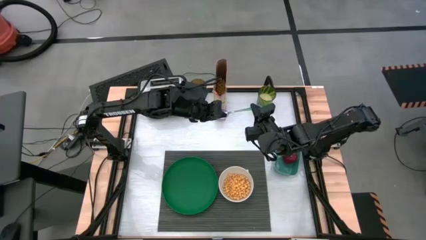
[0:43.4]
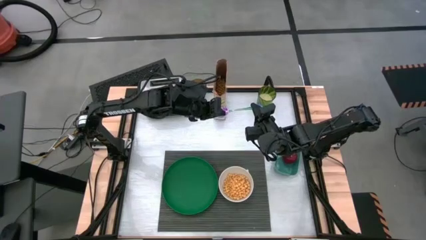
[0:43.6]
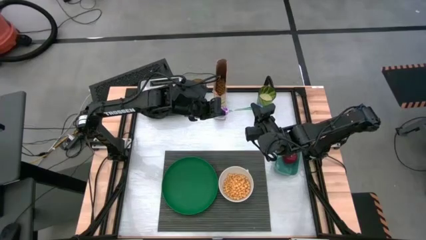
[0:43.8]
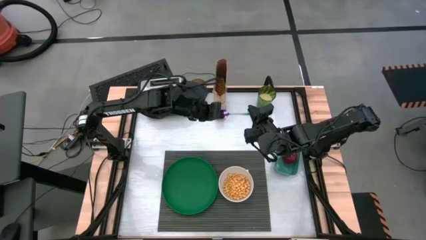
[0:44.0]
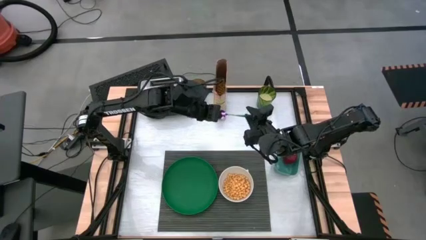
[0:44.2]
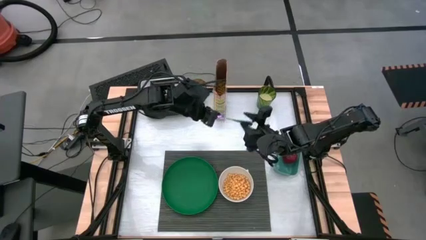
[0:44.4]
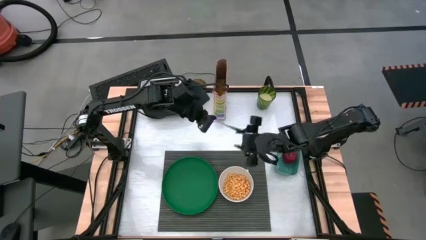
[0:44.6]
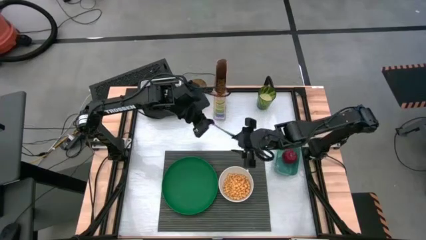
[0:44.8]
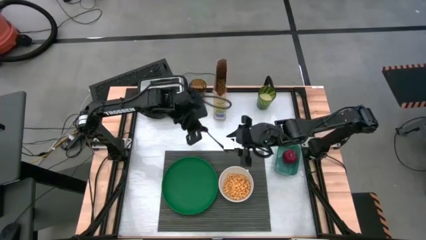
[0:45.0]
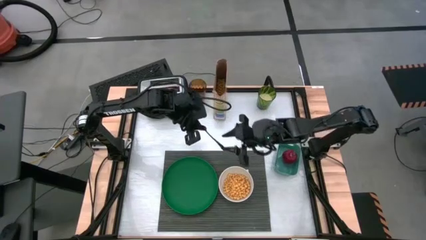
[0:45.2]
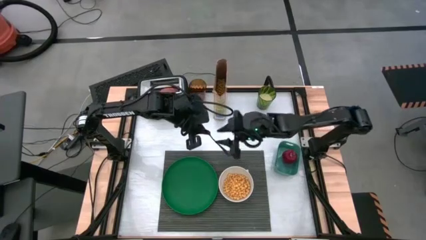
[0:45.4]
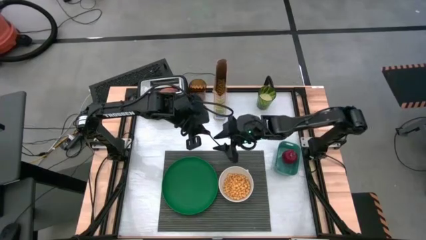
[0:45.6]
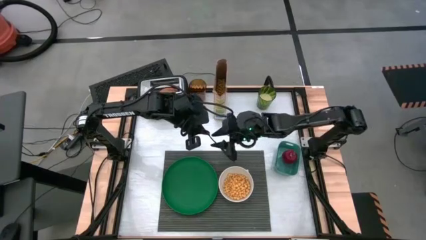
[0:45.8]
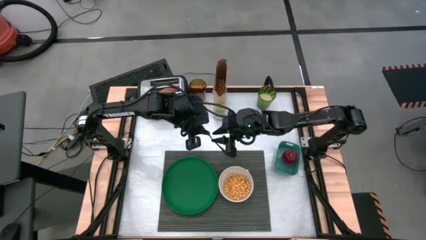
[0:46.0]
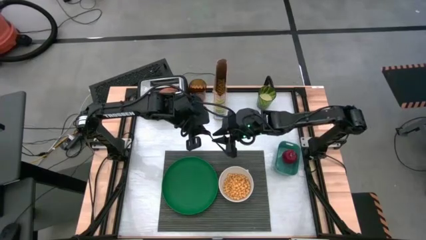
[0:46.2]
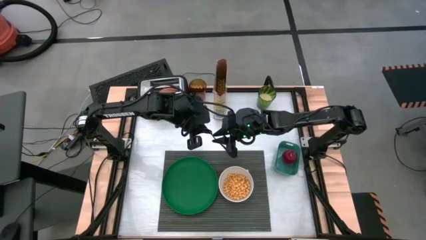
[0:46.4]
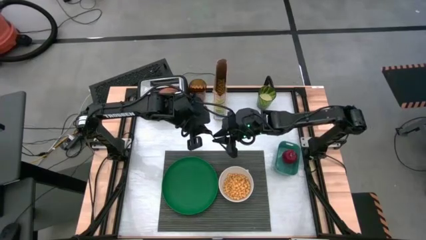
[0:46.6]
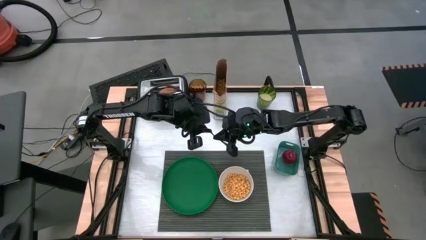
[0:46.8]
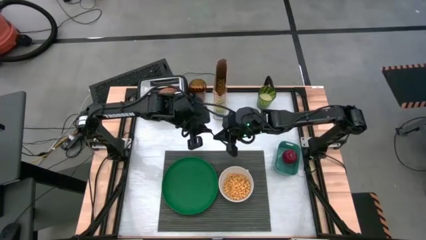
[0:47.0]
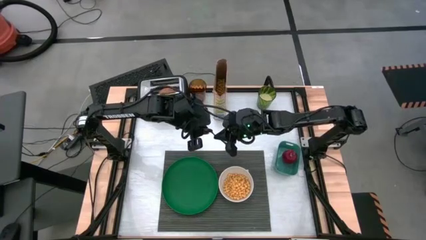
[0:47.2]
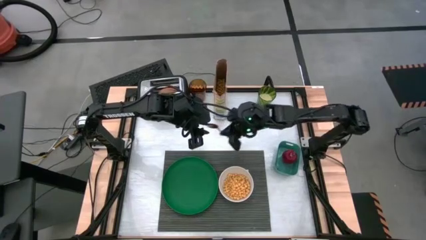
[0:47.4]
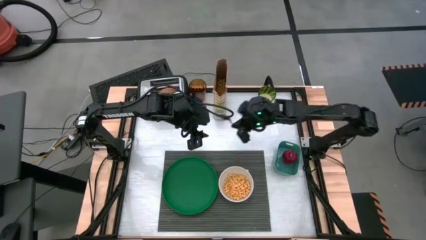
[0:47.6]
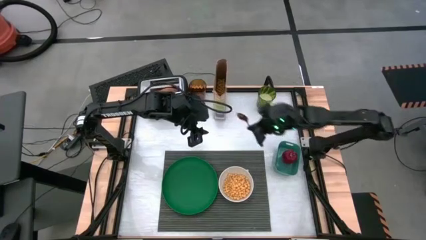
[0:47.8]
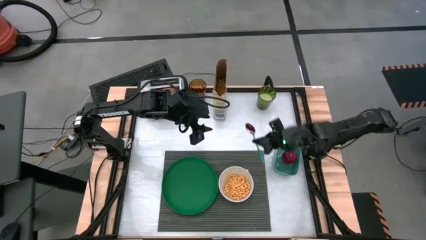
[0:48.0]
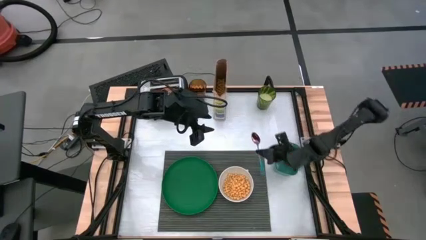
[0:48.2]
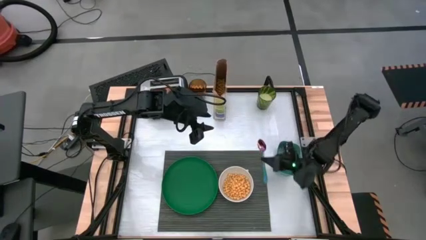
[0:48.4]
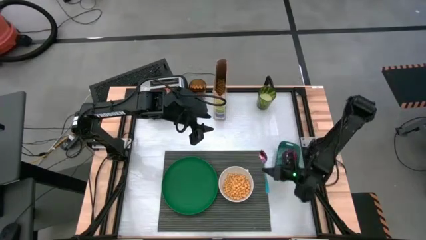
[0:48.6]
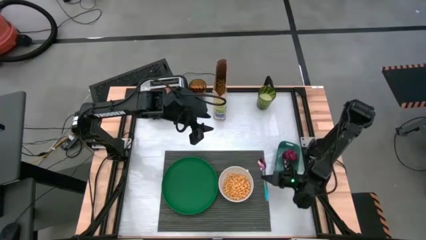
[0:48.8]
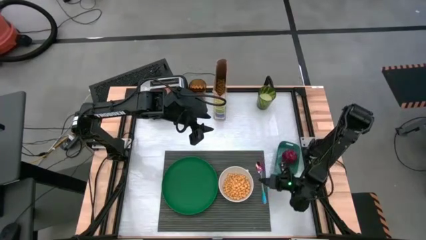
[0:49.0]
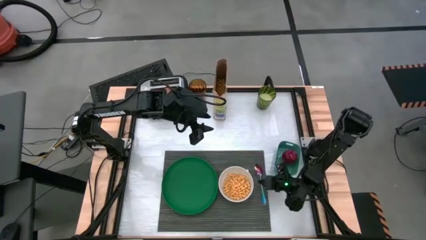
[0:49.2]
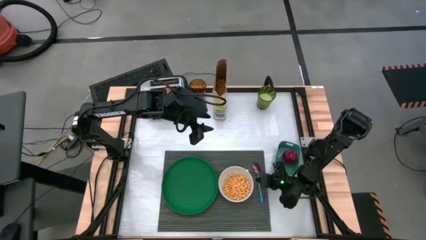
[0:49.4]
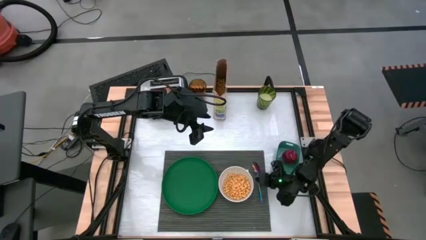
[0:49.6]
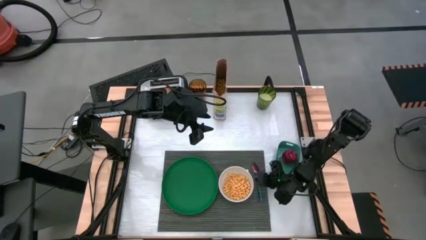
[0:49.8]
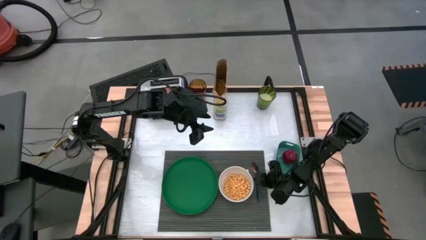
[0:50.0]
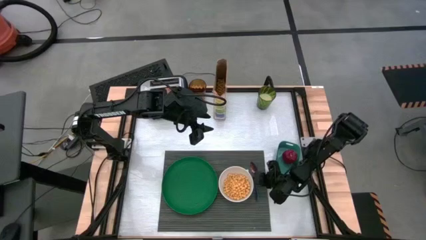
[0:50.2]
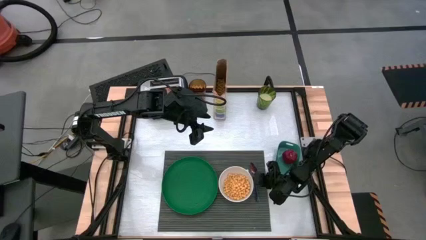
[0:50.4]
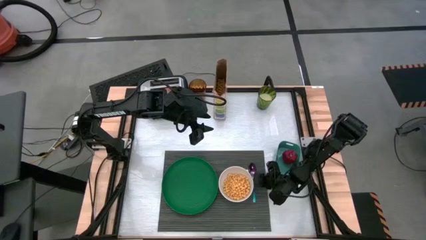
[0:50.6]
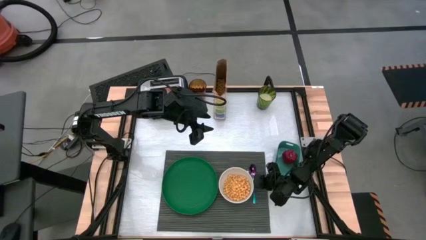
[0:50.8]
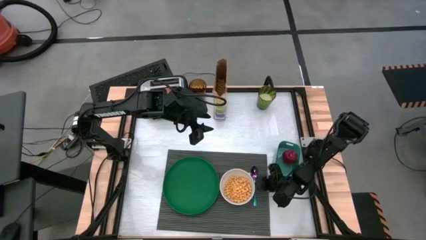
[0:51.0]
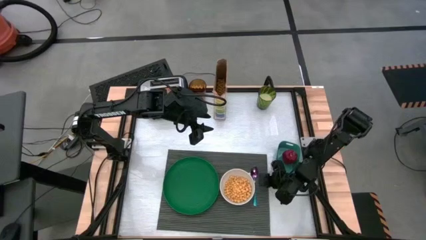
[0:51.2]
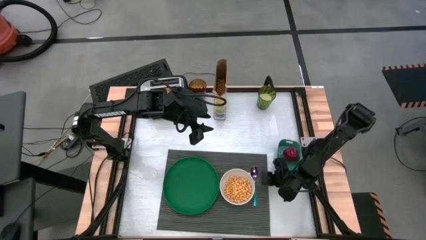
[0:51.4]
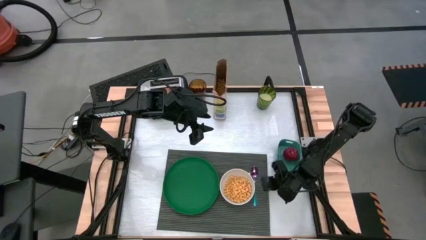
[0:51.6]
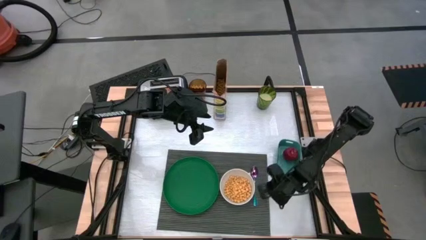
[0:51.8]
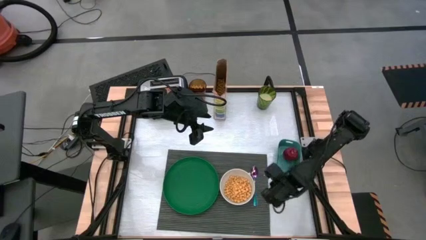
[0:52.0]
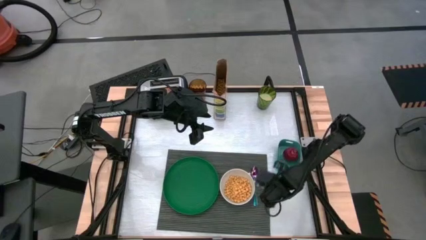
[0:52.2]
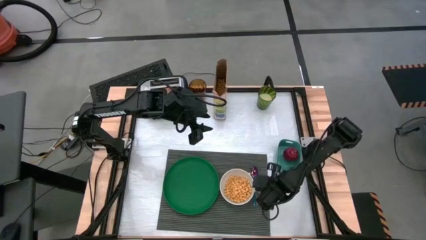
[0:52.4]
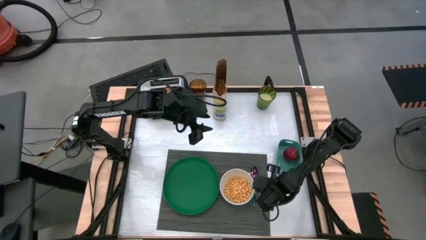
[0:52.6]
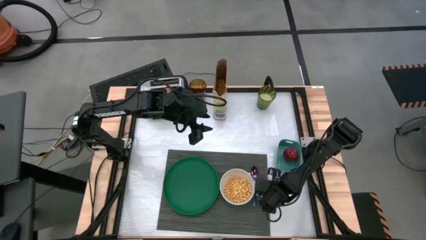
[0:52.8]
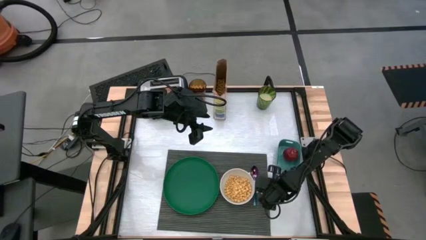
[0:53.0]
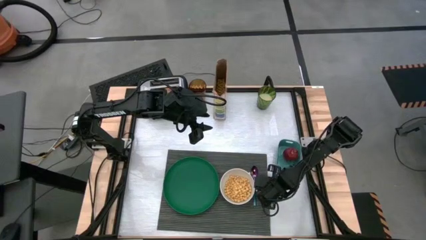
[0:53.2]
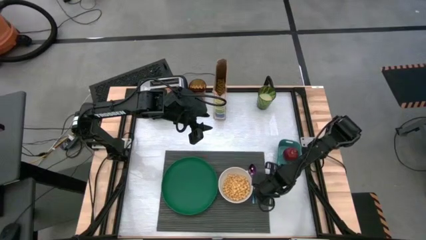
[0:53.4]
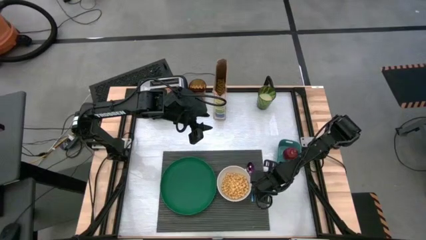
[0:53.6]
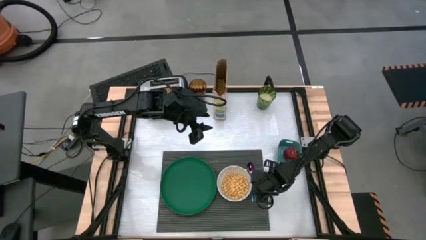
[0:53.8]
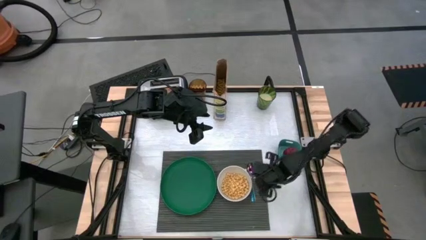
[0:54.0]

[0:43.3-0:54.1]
Task: Arrange a breakfast setting
Put the spoon beside the bowl on the mat

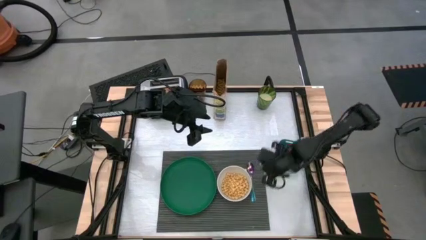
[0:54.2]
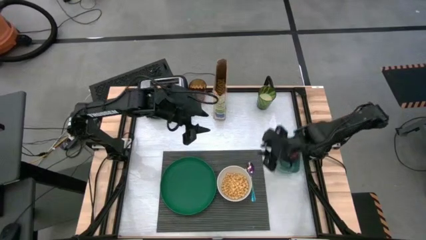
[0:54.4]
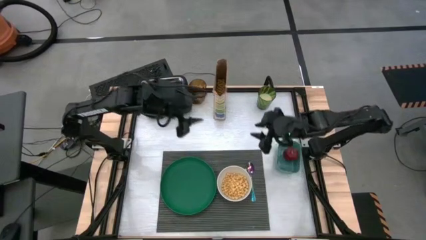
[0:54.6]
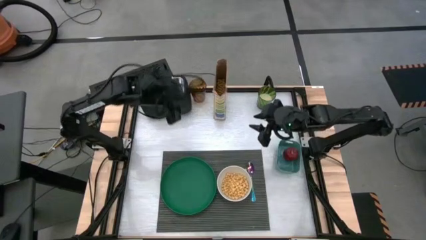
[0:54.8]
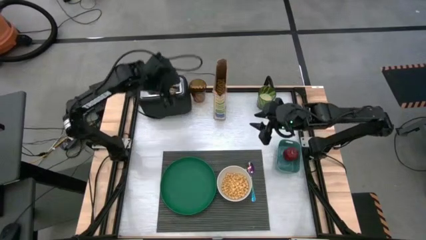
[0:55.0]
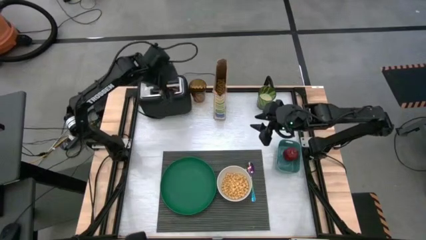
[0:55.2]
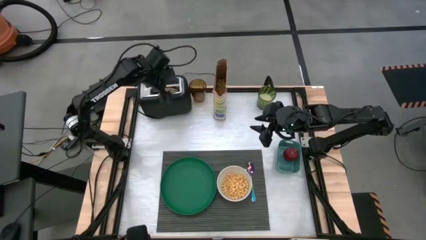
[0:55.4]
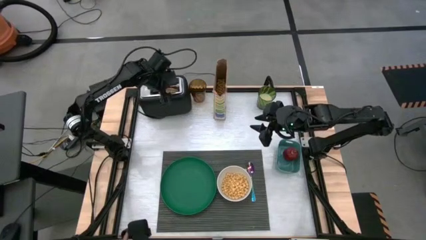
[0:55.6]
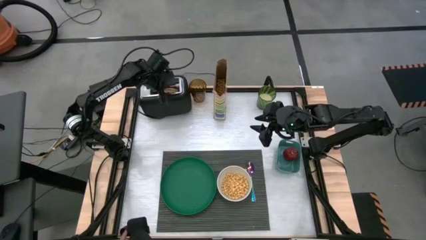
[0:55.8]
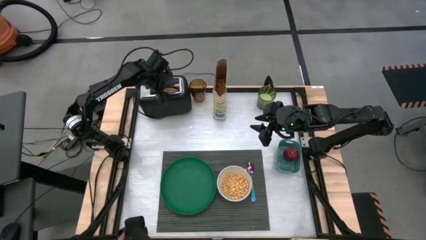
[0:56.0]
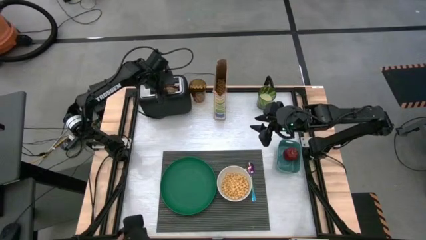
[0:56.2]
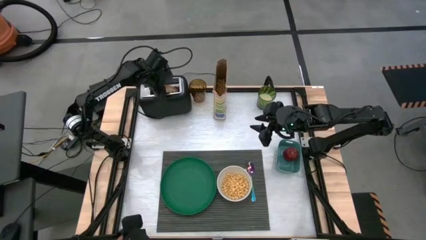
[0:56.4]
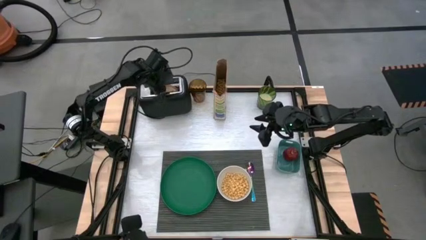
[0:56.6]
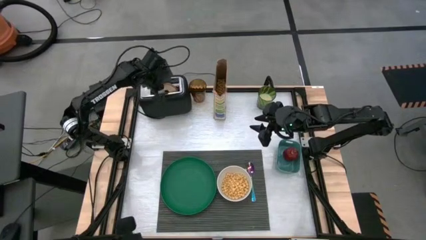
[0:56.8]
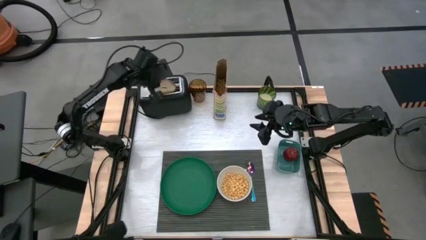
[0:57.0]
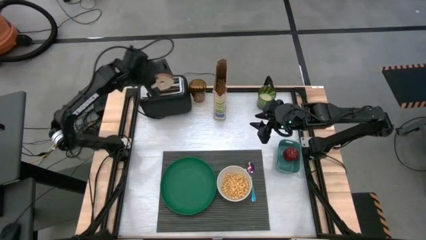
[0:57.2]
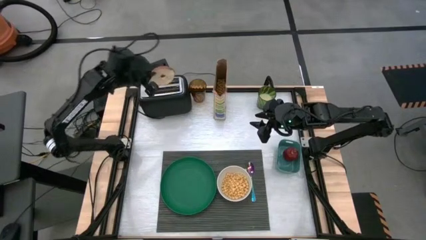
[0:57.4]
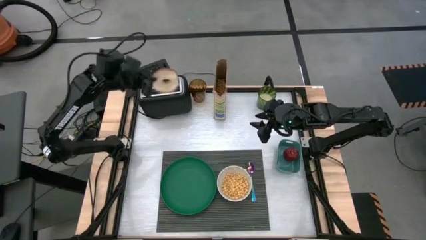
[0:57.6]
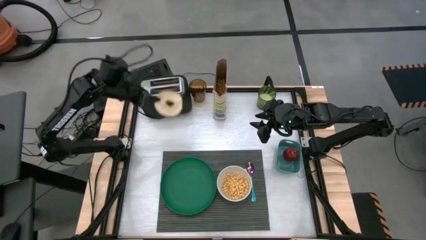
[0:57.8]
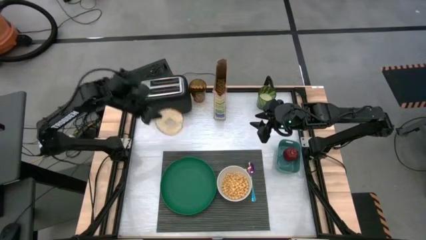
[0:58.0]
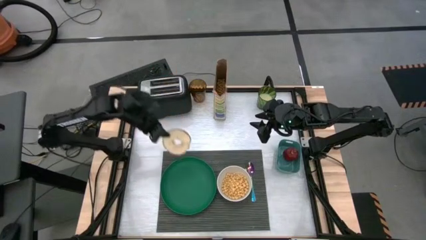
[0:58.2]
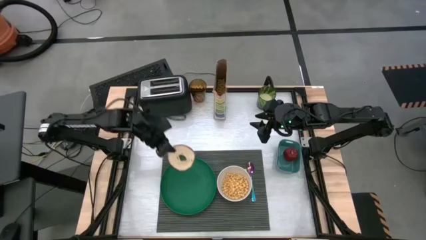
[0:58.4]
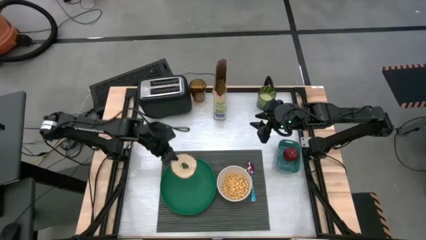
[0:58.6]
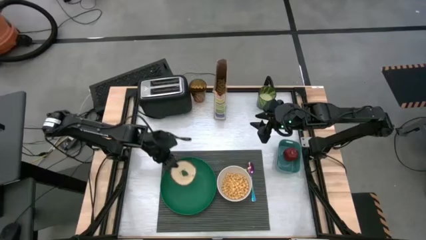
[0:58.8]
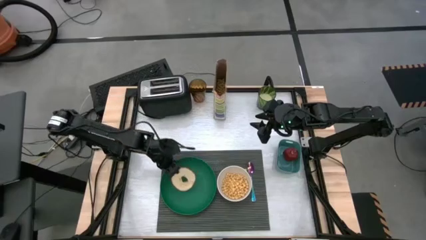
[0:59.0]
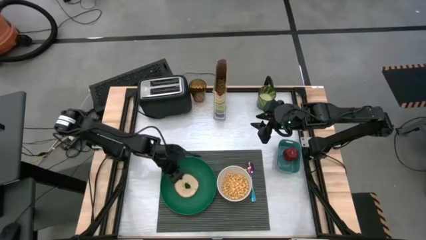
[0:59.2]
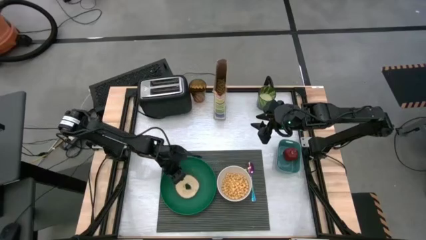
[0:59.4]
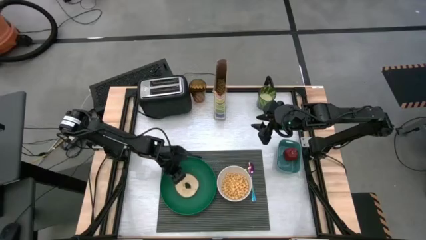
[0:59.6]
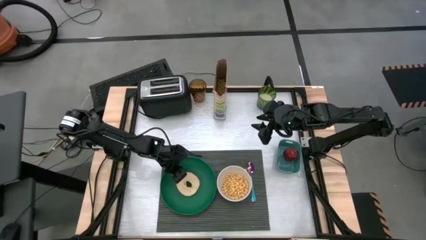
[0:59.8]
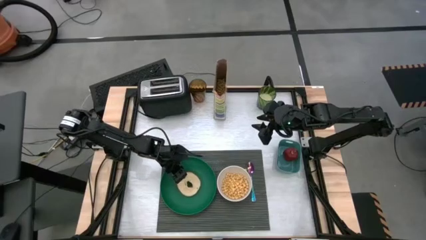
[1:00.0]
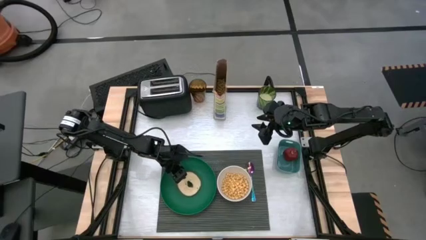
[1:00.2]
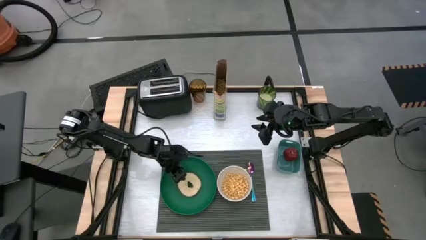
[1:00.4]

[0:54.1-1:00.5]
Put the bagel on the green plate
